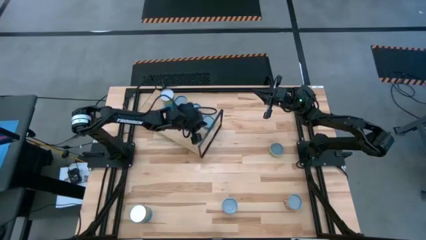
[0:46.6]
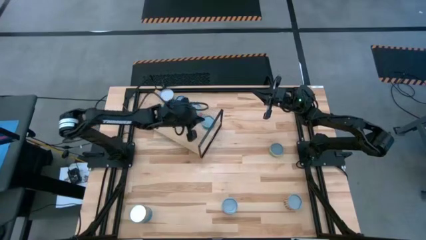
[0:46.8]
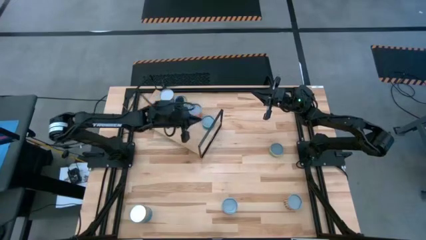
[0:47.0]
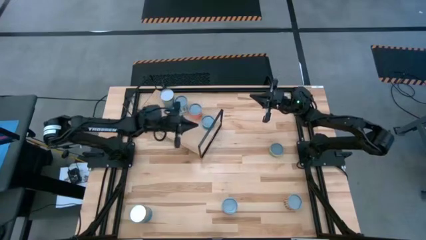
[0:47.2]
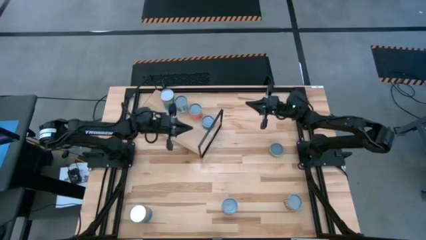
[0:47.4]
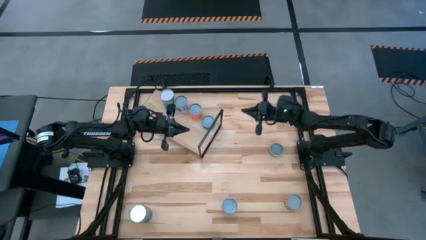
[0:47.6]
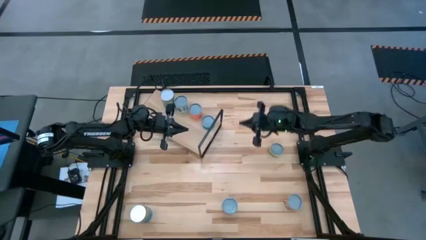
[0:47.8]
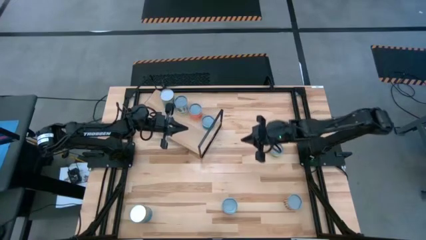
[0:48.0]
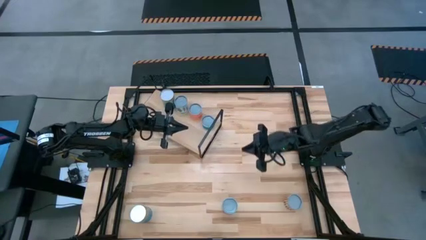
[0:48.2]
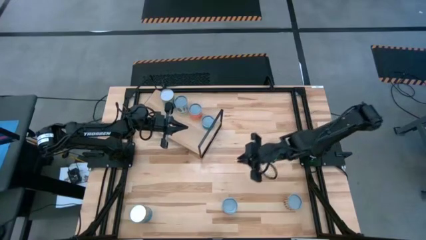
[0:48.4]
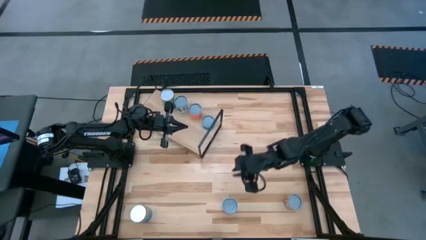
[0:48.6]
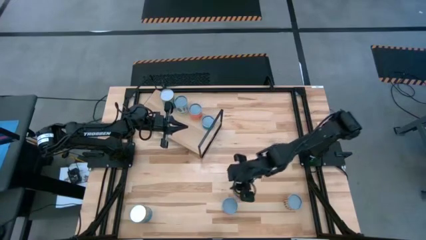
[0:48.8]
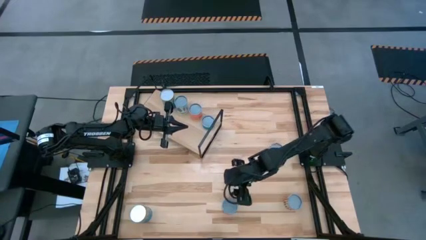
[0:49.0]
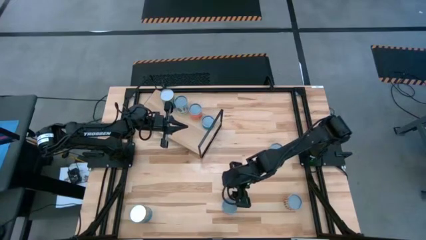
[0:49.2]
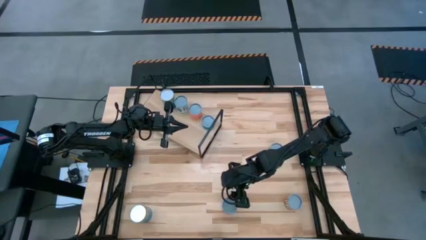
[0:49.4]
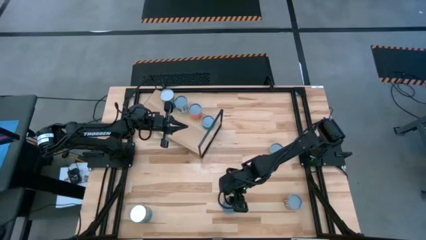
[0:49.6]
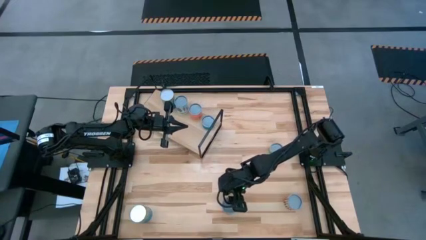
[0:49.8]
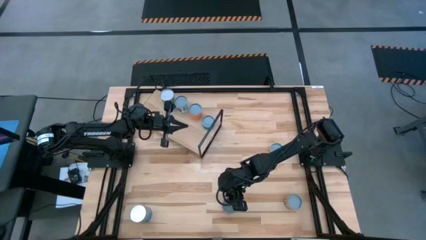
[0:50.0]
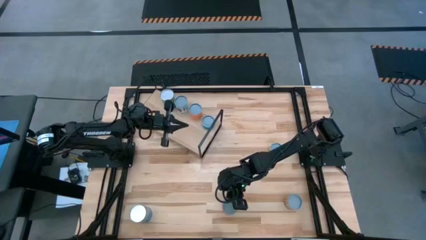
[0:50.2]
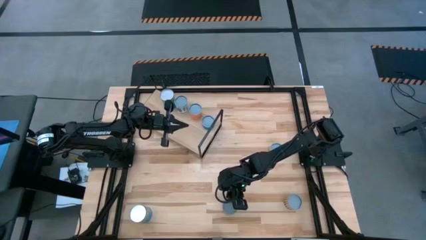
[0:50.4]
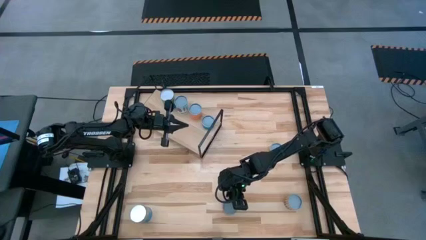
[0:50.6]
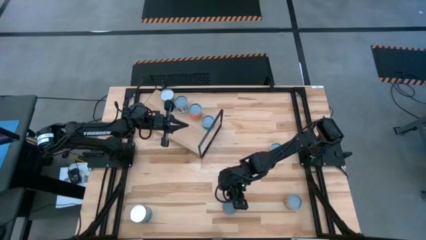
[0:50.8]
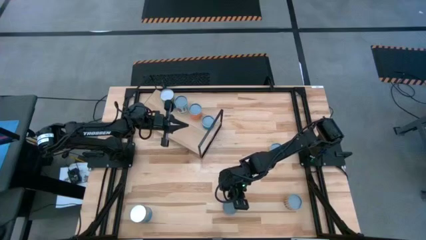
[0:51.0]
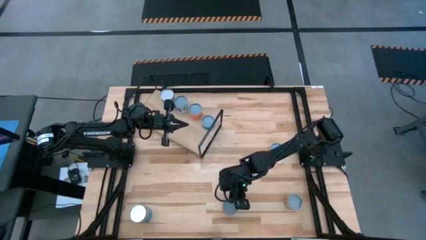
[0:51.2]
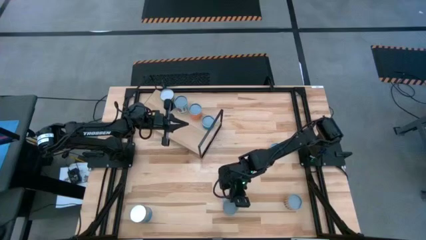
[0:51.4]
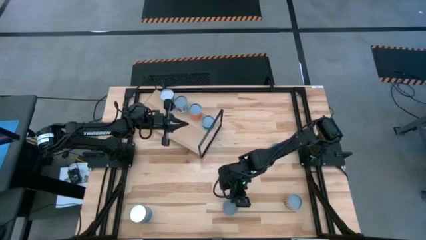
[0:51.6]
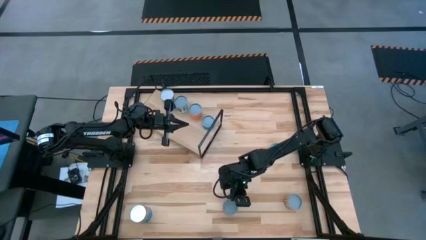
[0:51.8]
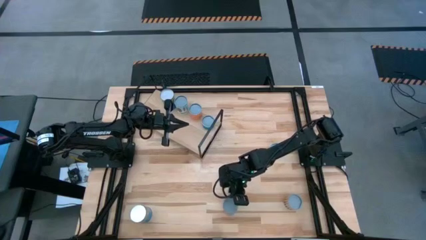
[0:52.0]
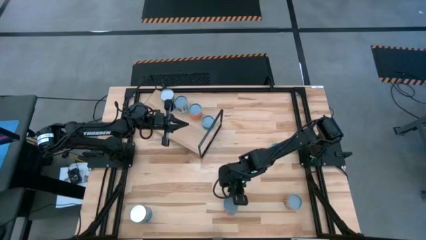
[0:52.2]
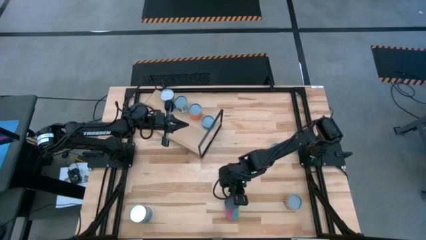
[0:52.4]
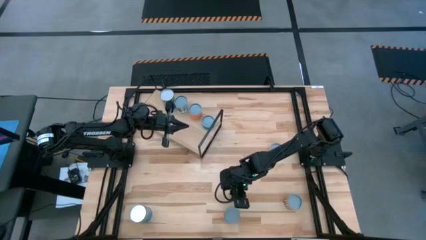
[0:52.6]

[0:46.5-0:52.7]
Task: Pick and place cans onto a shelf
Put the canned chicken soup on the shelf

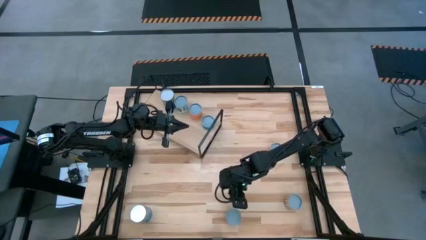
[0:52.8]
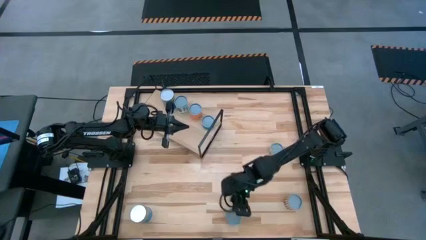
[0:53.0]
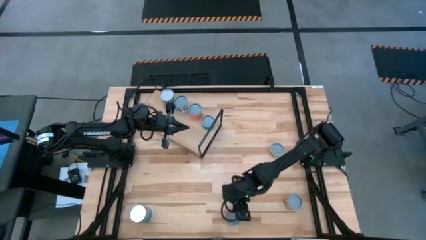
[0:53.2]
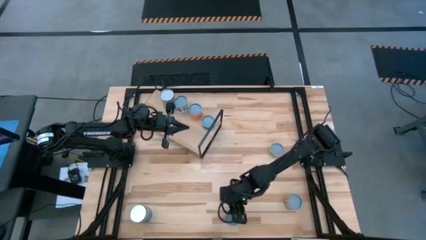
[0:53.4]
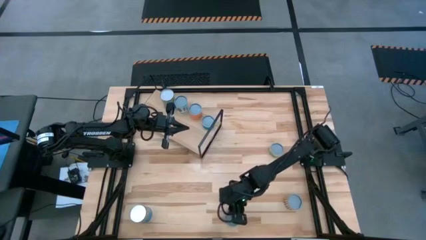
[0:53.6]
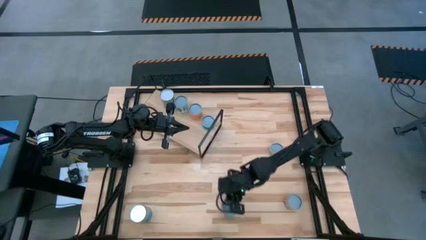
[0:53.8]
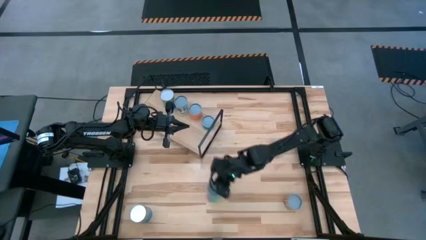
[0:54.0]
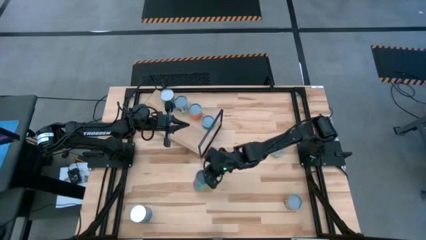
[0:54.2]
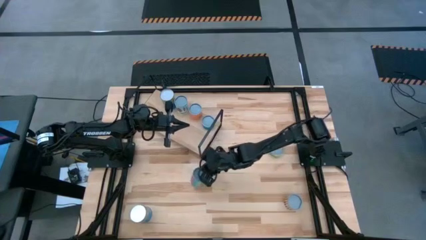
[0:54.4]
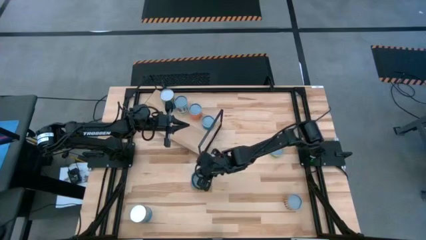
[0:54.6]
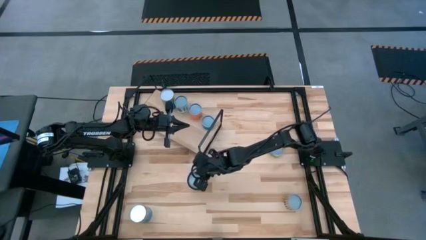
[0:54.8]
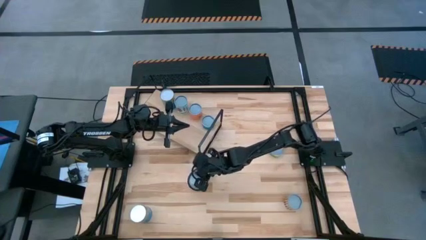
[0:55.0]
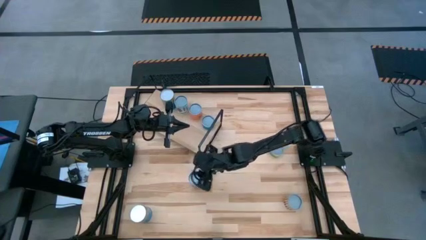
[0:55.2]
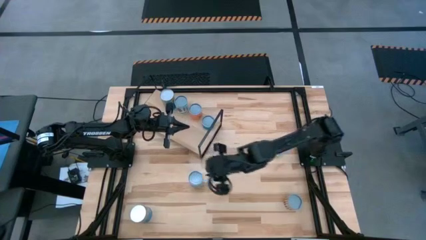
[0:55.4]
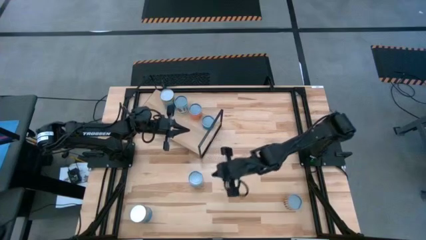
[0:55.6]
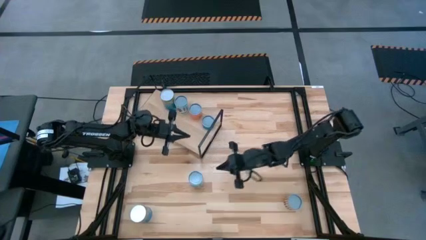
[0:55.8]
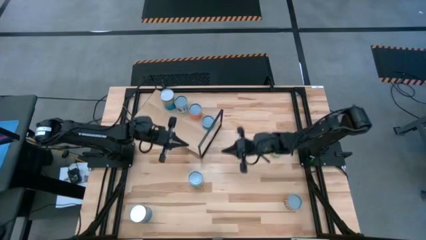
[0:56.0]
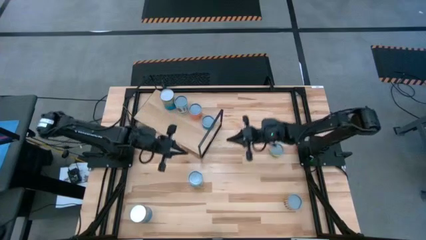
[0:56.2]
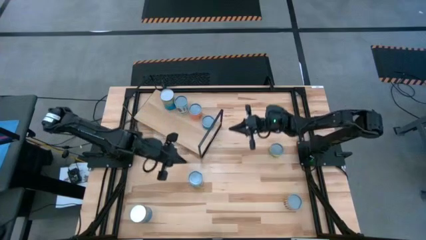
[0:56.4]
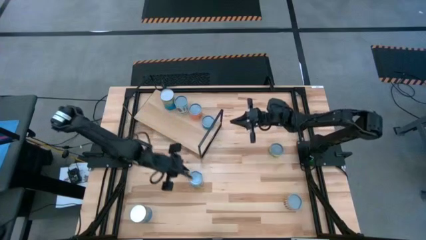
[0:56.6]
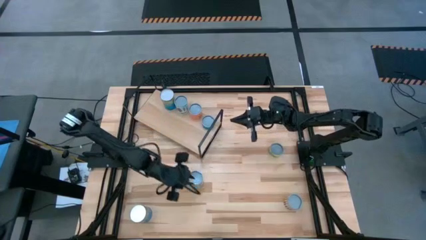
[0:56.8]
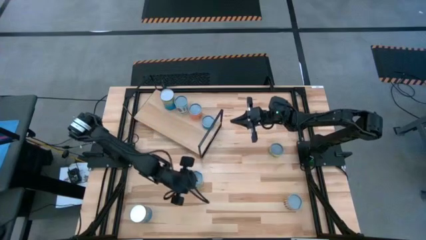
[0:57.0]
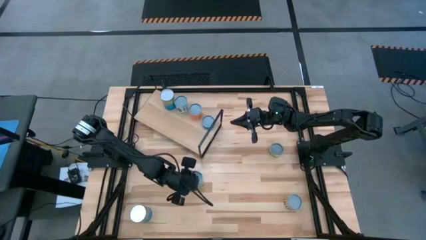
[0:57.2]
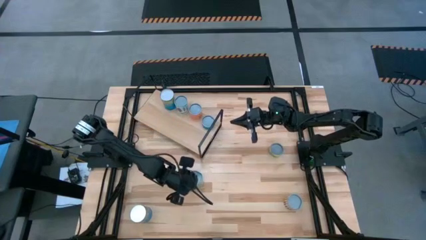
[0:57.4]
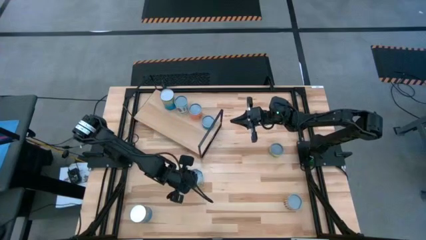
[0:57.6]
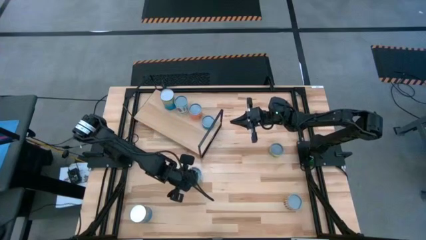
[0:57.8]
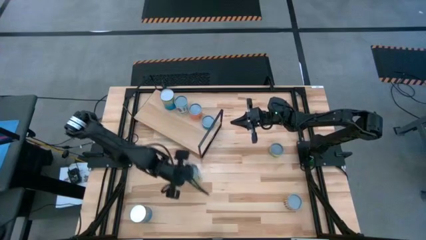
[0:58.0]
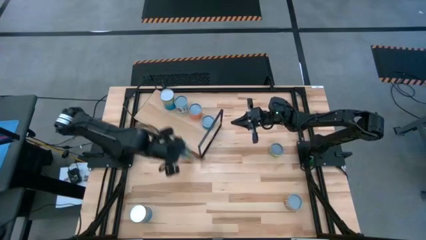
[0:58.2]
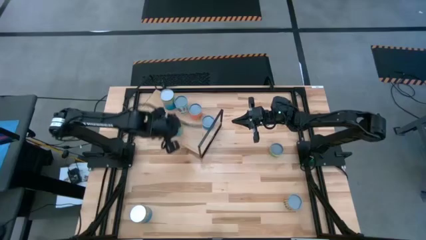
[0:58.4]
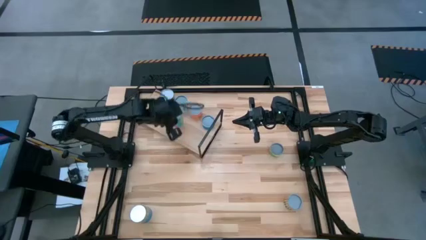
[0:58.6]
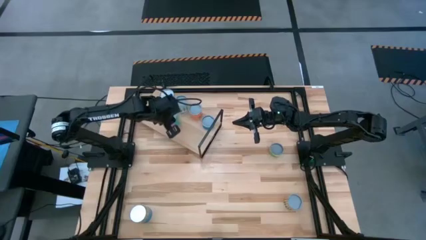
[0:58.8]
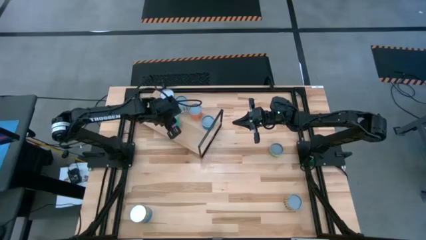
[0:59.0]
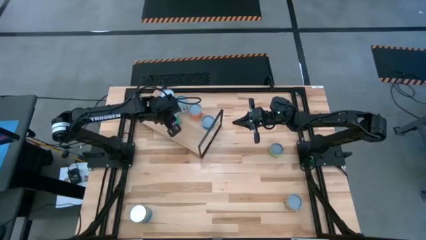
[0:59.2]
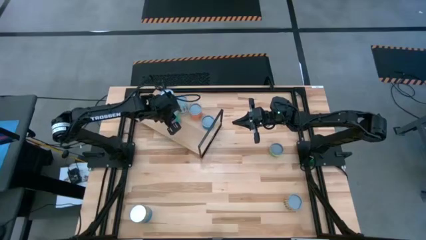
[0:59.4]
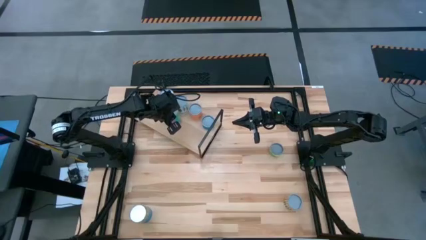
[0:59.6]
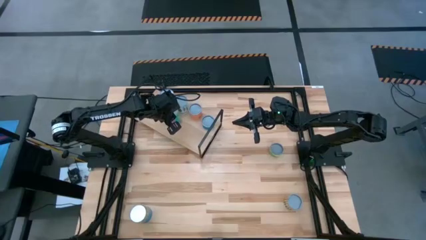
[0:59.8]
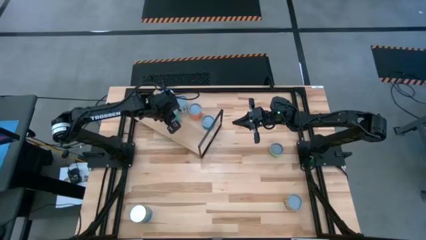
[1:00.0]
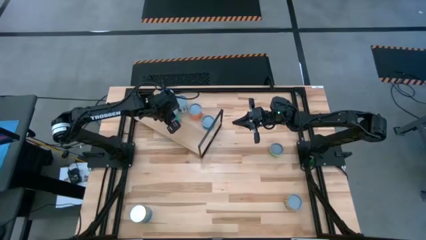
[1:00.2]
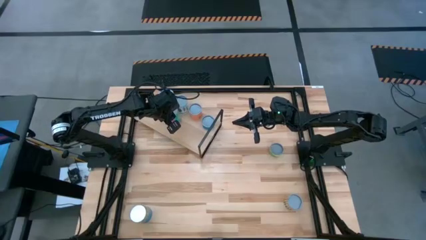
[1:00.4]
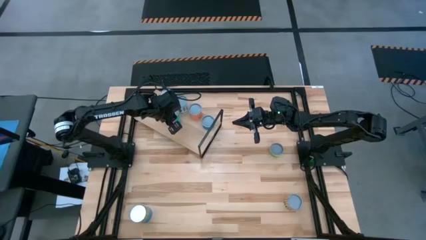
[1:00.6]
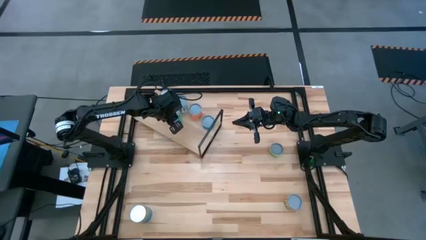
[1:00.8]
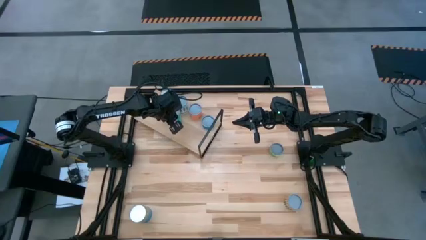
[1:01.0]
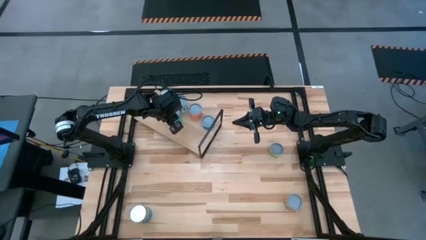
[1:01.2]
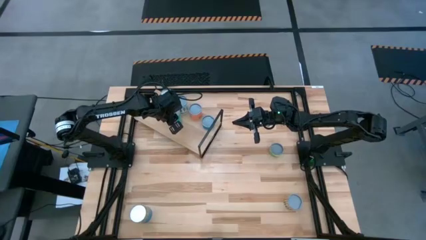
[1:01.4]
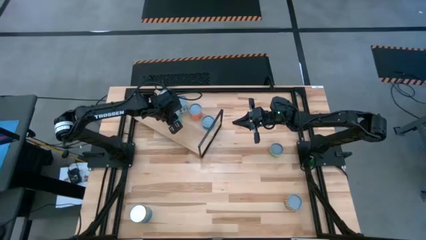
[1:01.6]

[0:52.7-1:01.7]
Put the canned chicken soup on the shelf
